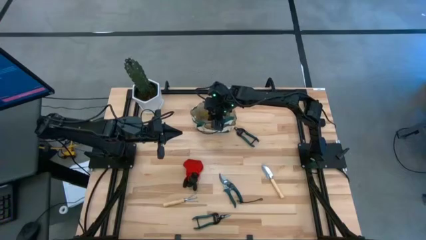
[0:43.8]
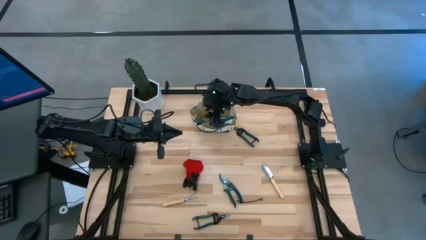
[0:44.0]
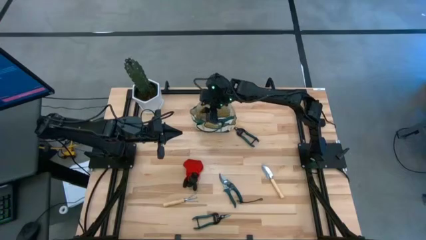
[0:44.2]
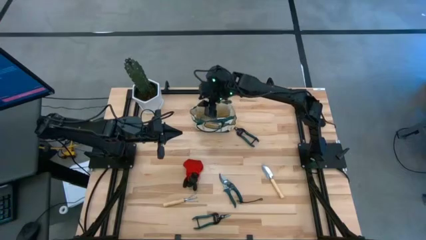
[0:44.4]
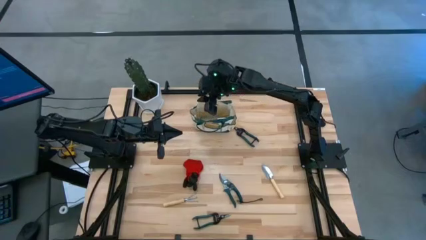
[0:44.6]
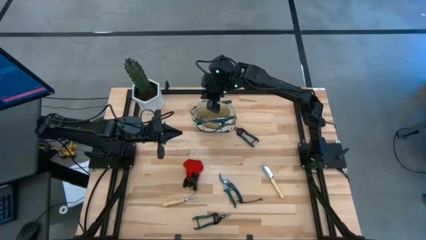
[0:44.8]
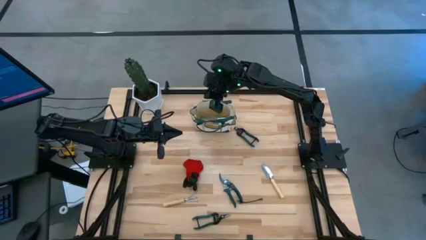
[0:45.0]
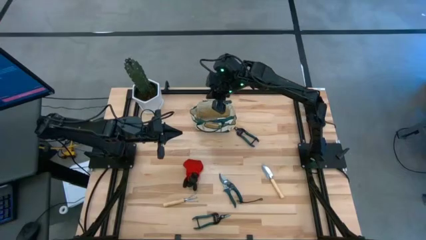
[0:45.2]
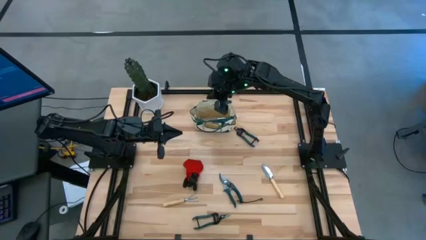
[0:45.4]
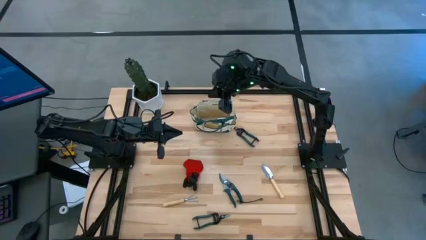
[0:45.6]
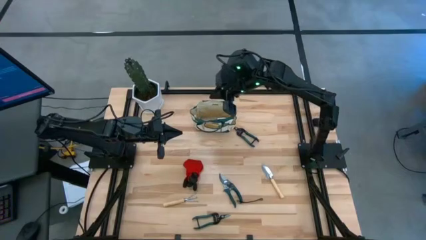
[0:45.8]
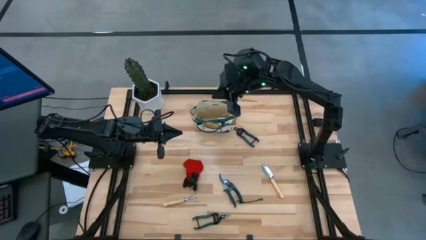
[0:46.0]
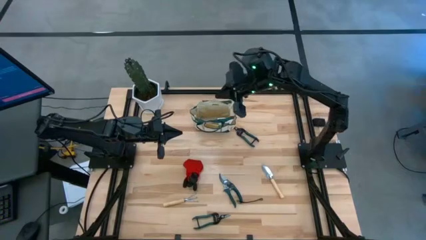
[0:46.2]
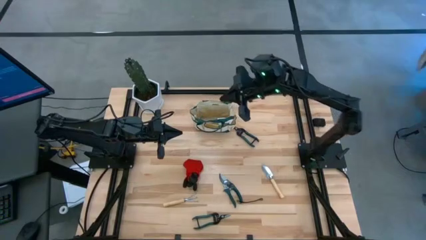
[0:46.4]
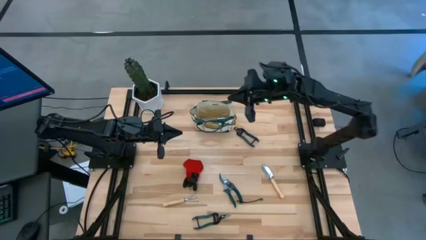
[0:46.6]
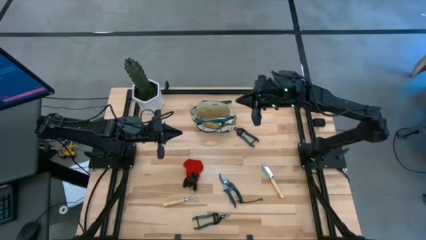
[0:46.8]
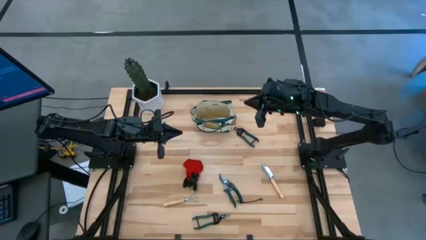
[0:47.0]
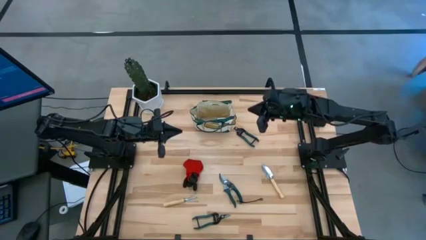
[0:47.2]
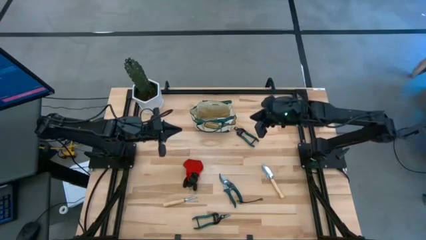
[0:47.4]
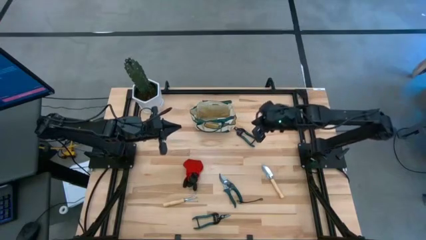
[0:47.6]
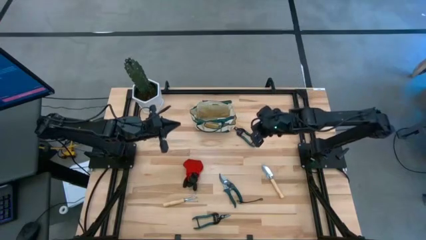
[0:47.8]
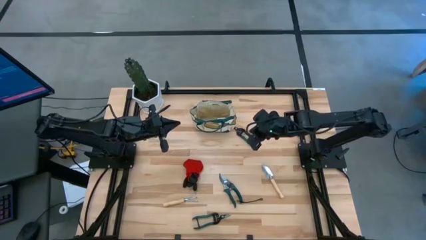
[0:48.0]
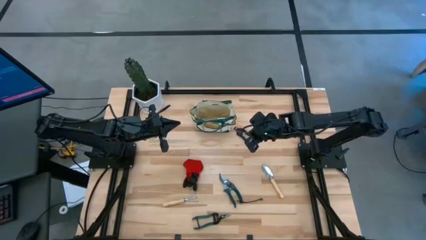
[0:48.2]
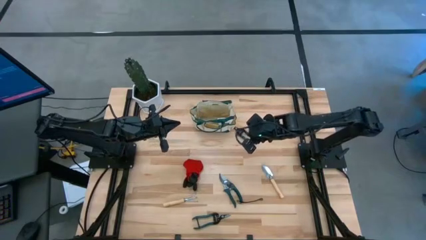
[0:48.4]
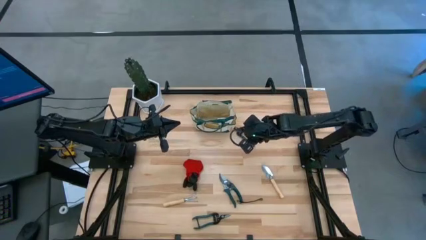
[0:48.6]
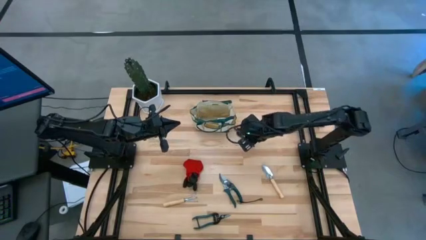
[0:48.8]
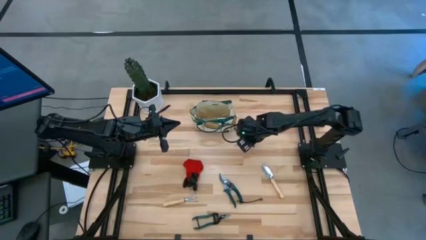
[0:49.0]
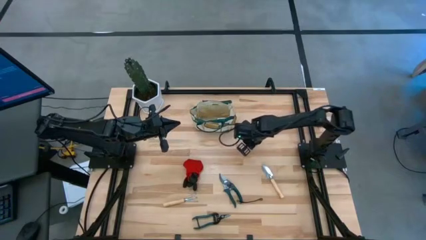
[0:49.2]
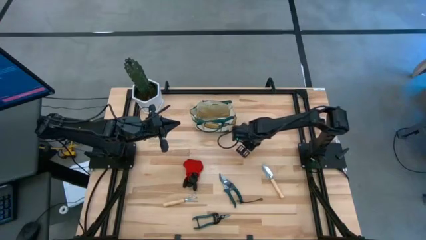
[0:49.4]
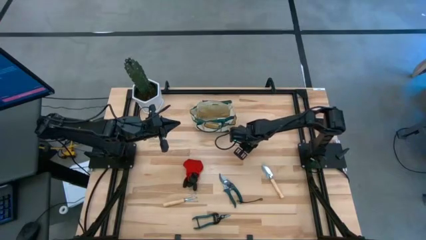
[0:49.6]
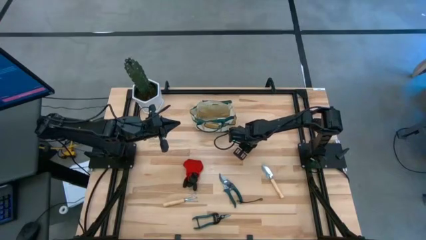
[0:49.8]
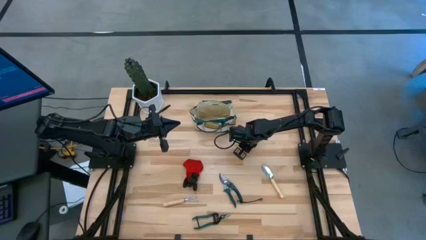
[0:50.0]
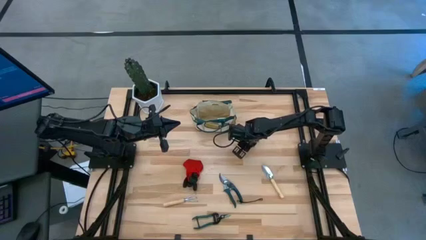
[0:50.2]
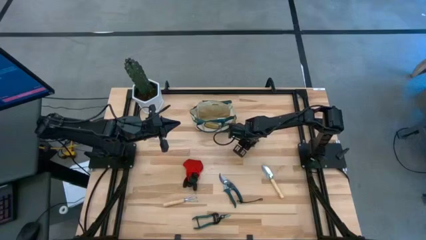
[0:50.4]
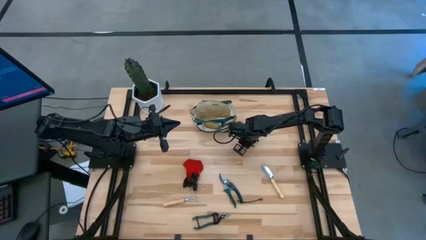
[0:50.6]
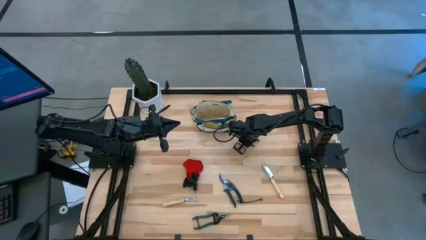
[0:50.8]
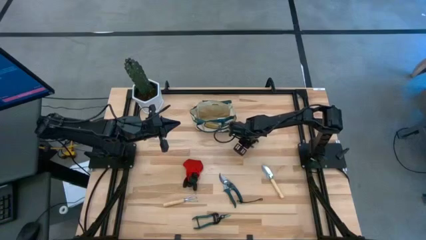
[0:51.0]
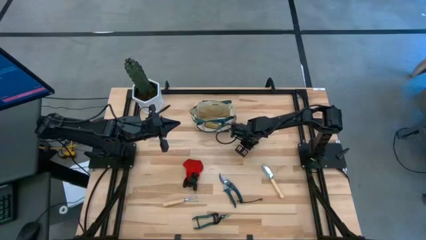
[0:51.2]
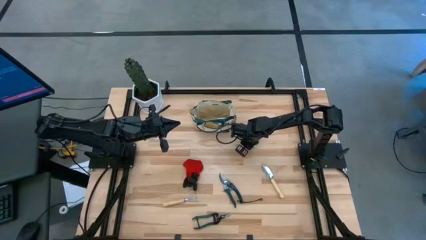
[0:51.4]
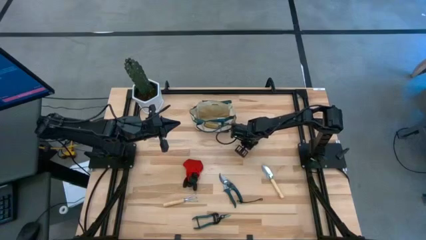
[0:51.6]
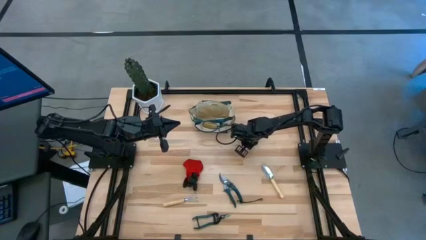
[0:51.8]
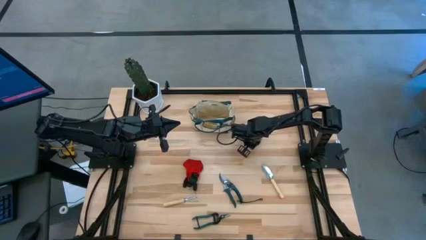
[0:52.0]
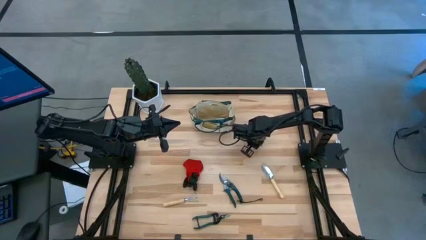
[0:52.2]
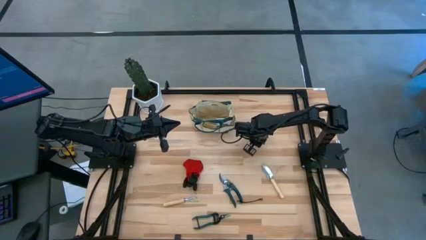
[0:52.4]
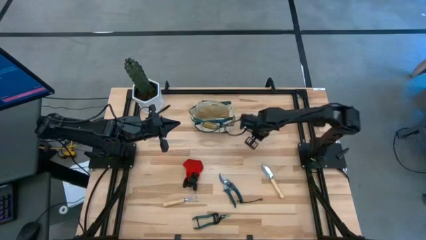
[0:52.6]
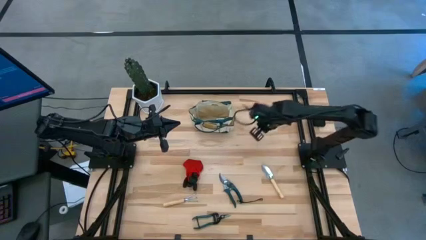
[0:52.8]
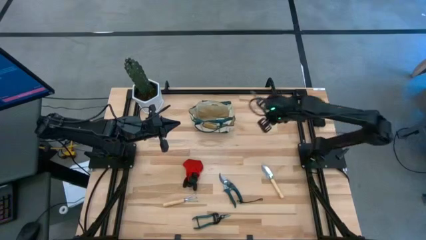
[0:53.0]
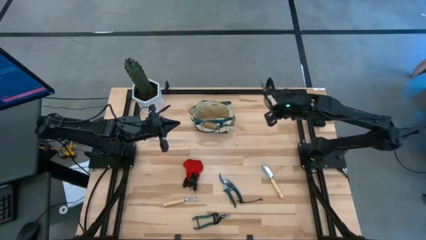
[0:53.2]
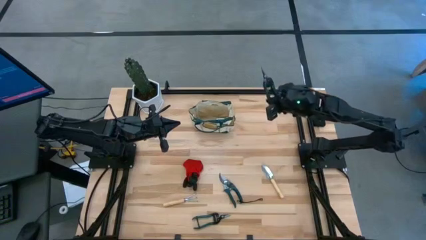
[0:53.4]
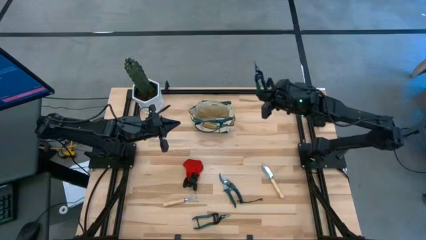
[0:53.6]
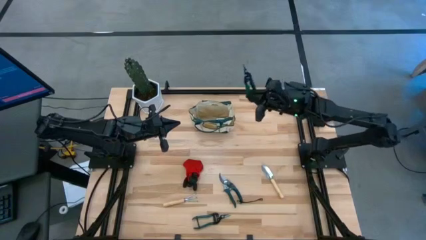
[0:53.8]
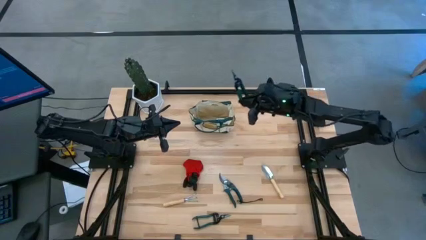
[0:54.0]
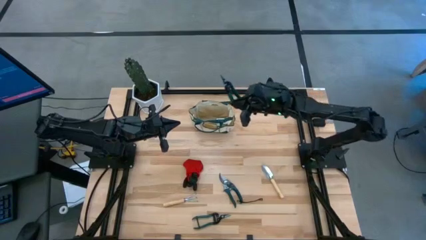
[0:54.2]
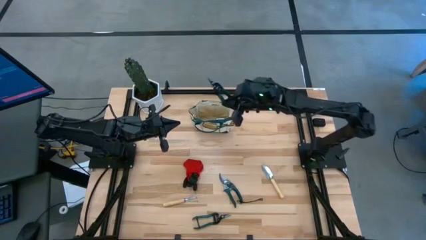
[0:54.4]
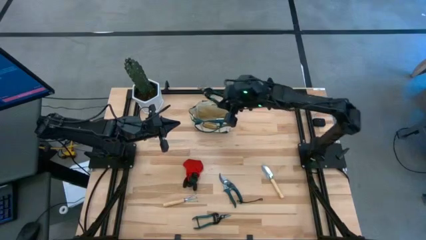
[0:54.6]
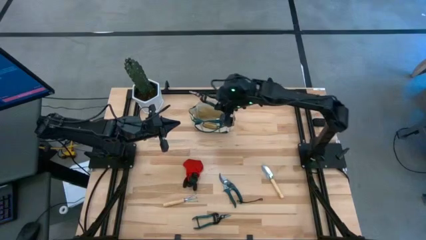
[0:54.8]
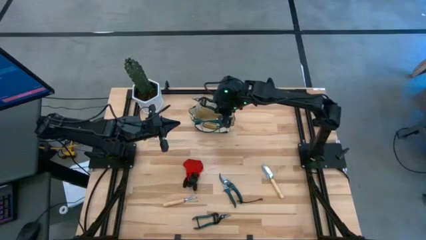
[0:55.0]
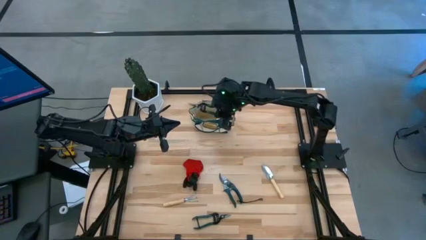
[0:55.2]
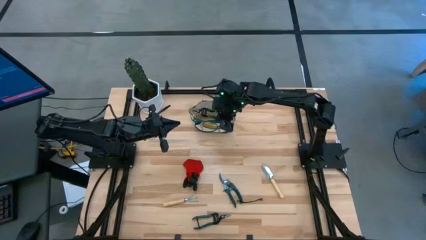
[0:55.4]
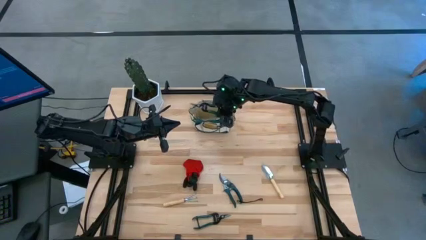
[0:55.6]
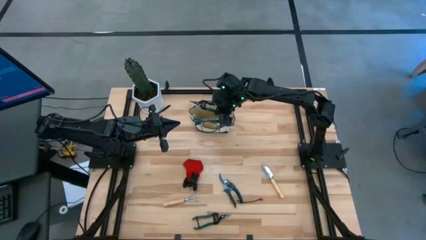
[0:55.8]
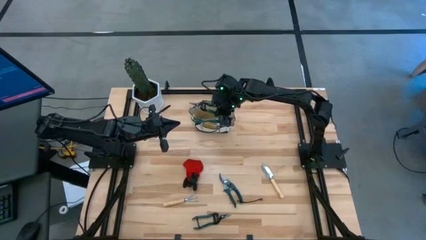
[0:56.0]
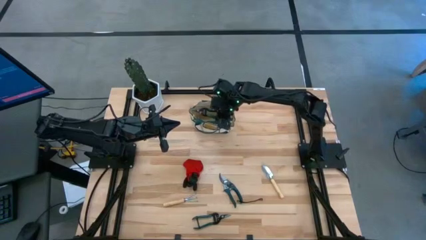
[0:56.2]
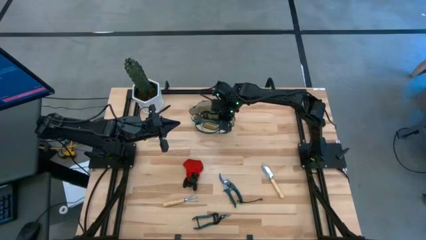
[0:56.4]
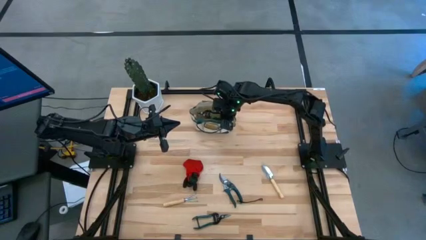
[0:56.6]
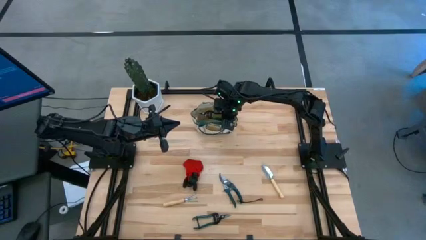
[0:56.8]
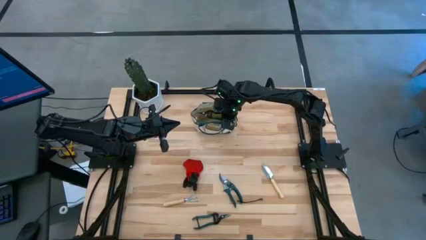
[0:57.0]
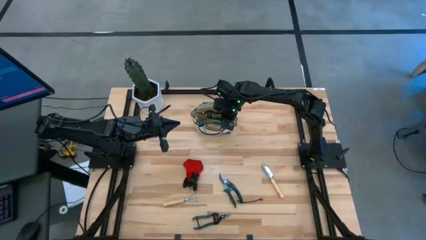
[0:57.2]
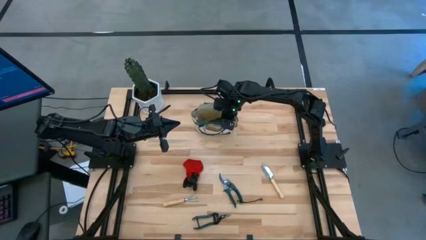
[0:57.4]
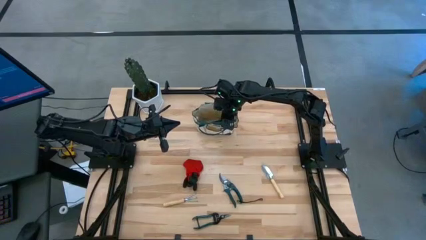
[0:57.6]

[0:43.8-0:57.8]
Task: Pick & Place Garden tools in Gardening bag
Put the top garden pruner into the gardening bag
